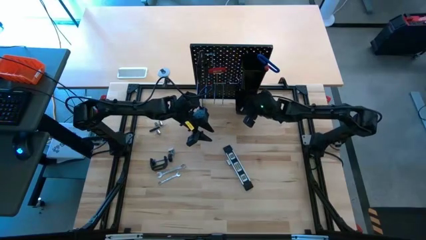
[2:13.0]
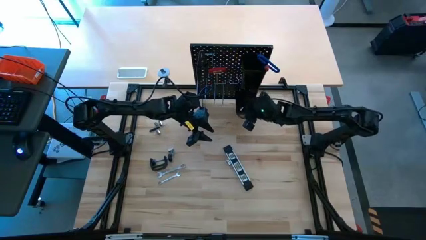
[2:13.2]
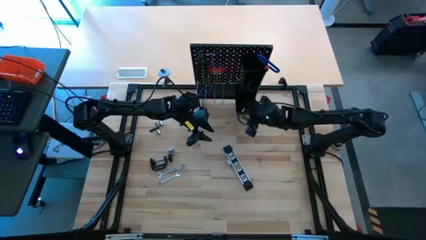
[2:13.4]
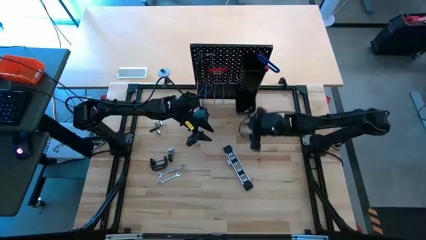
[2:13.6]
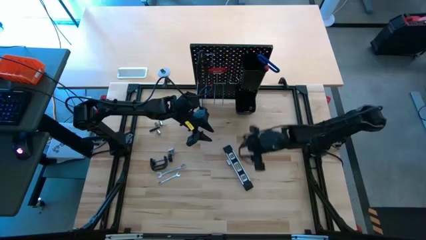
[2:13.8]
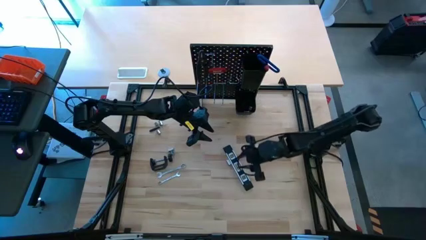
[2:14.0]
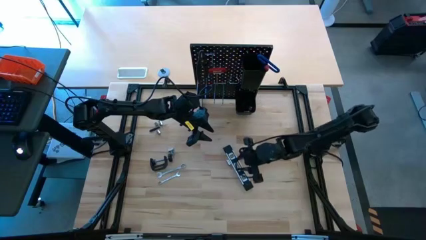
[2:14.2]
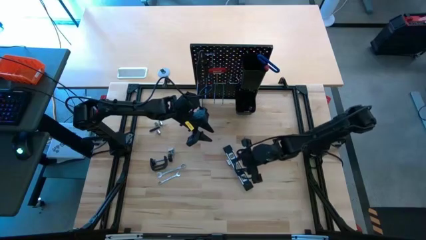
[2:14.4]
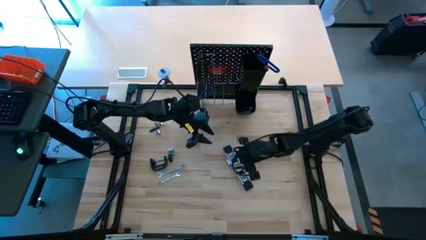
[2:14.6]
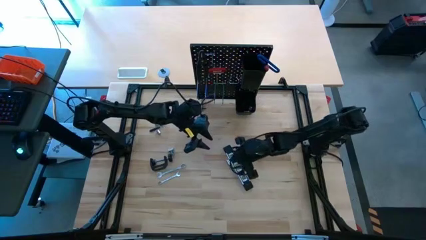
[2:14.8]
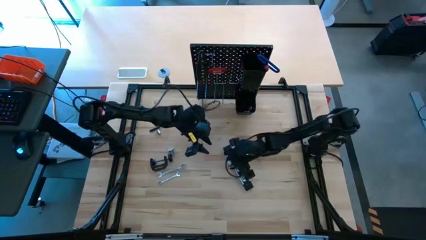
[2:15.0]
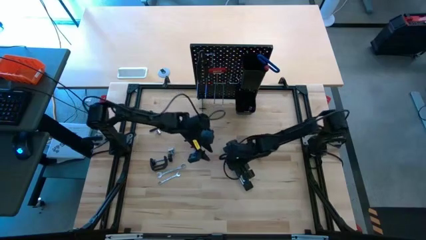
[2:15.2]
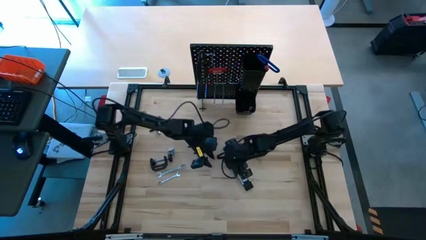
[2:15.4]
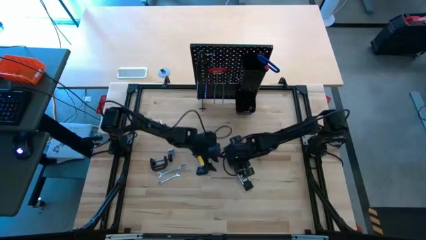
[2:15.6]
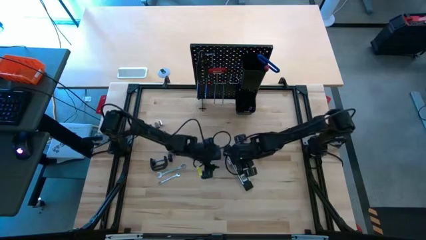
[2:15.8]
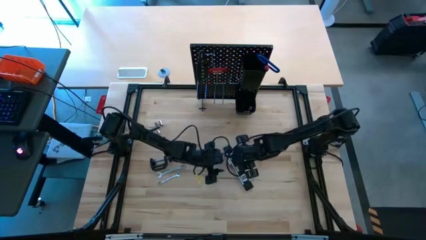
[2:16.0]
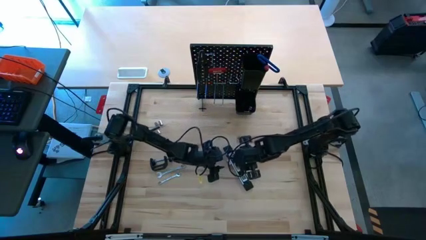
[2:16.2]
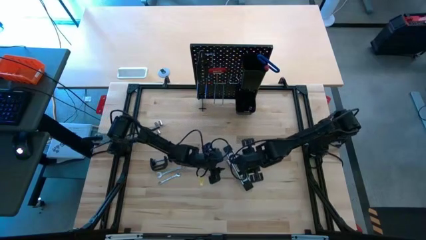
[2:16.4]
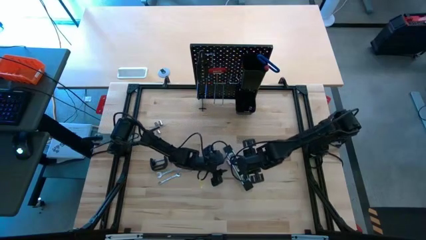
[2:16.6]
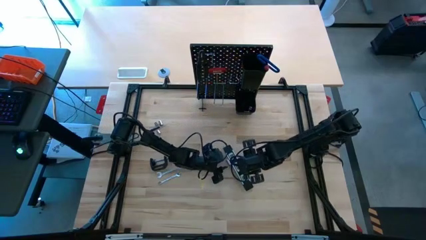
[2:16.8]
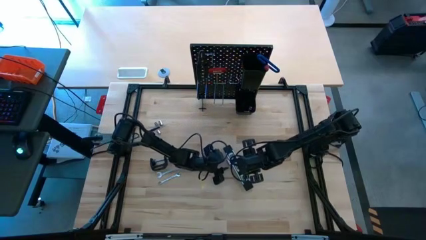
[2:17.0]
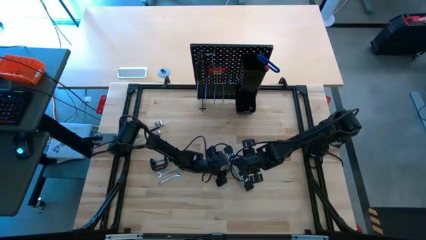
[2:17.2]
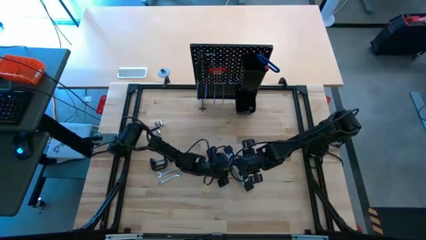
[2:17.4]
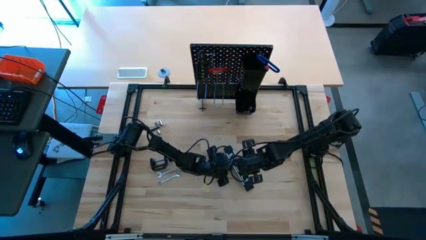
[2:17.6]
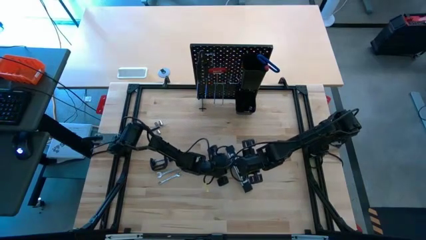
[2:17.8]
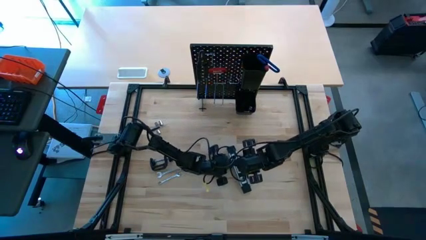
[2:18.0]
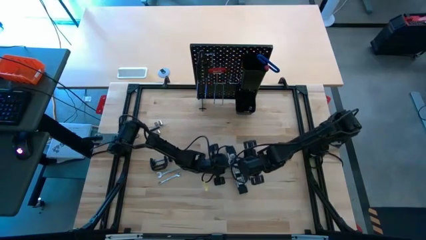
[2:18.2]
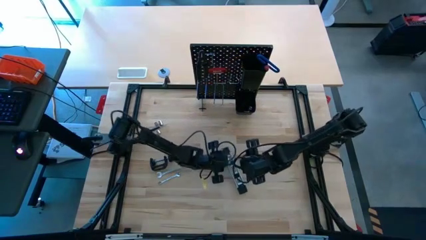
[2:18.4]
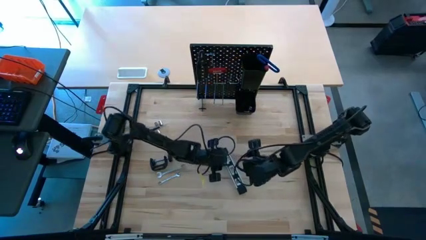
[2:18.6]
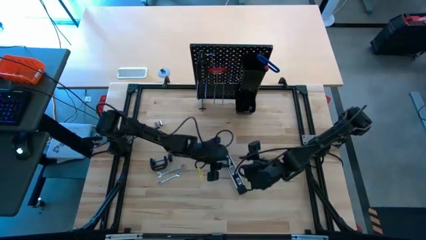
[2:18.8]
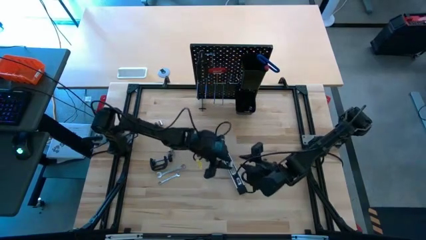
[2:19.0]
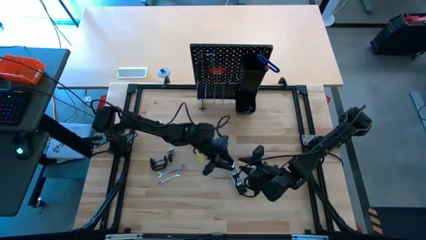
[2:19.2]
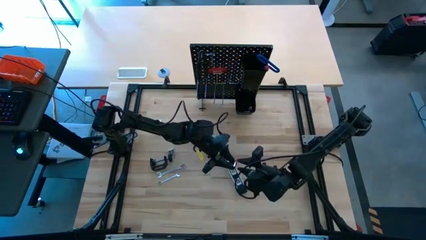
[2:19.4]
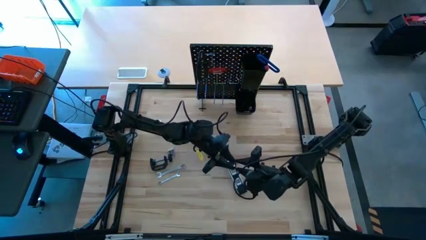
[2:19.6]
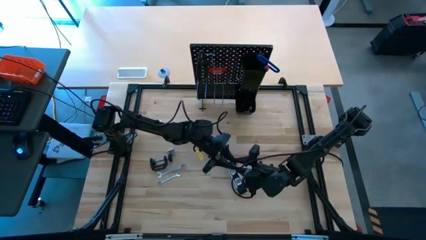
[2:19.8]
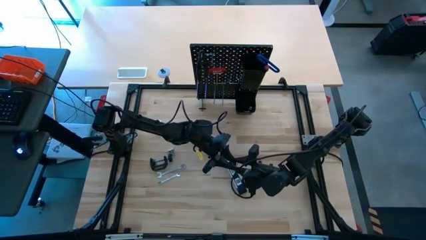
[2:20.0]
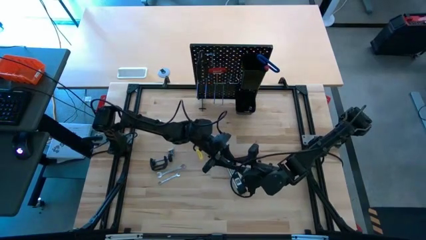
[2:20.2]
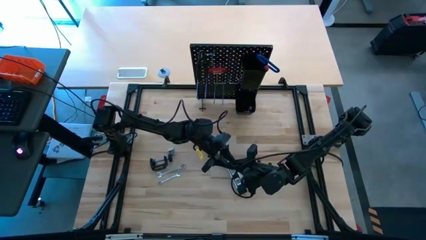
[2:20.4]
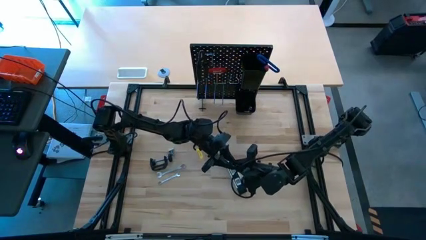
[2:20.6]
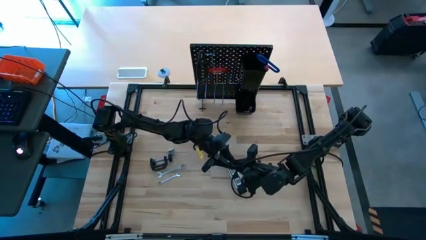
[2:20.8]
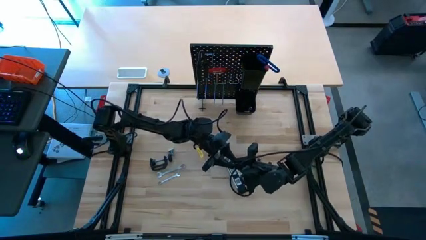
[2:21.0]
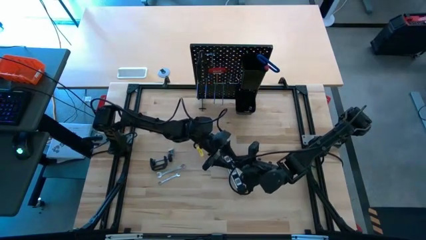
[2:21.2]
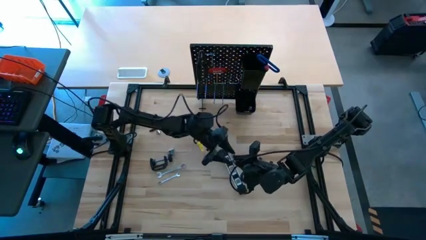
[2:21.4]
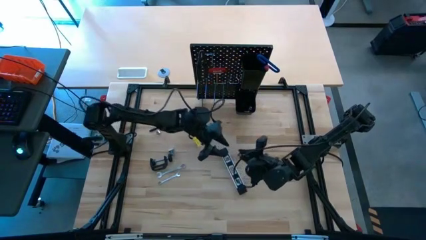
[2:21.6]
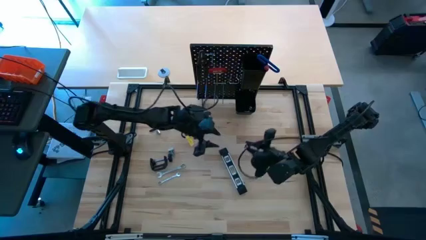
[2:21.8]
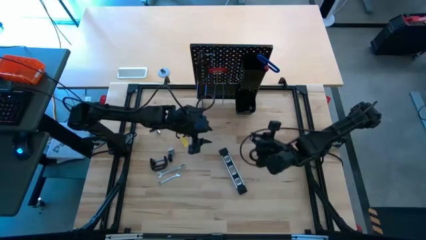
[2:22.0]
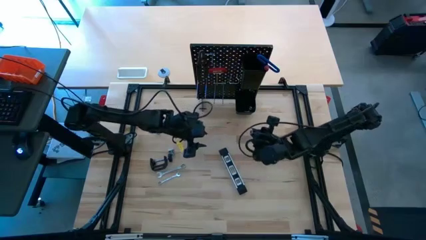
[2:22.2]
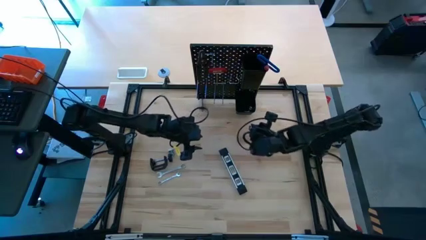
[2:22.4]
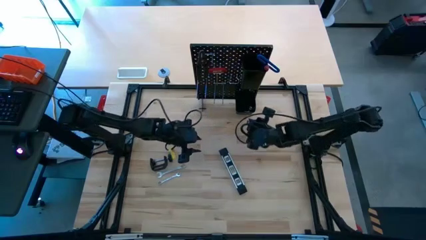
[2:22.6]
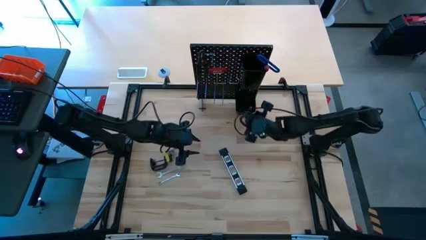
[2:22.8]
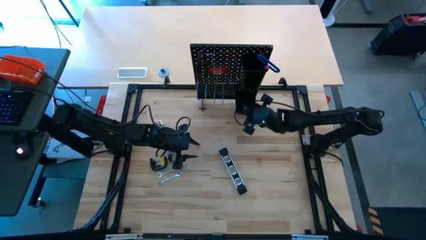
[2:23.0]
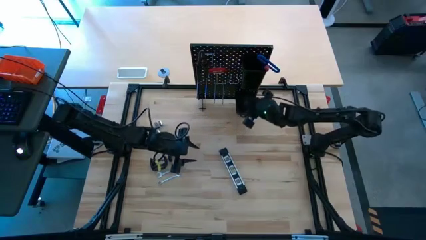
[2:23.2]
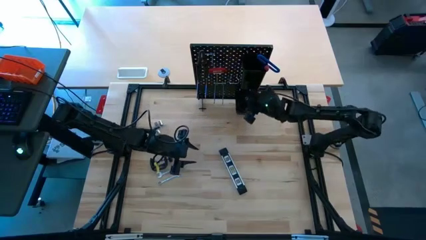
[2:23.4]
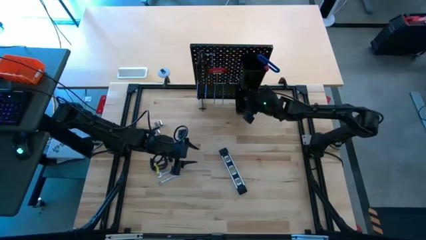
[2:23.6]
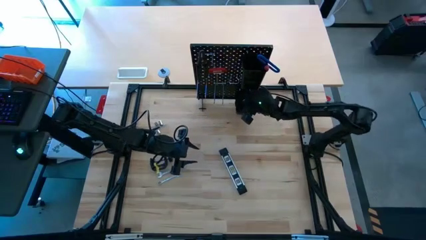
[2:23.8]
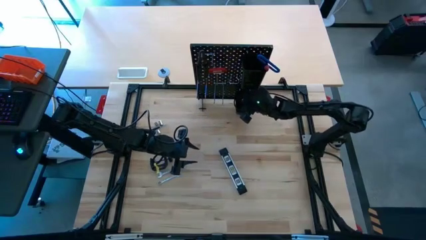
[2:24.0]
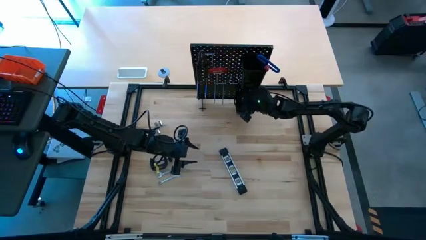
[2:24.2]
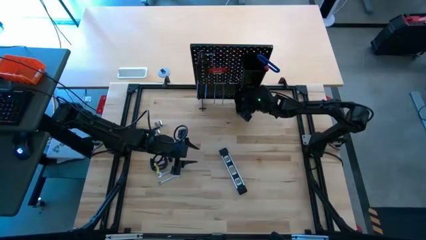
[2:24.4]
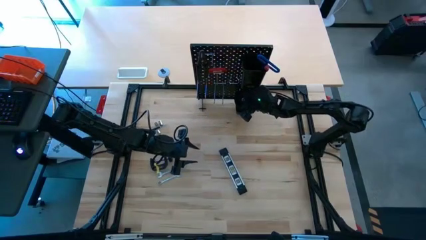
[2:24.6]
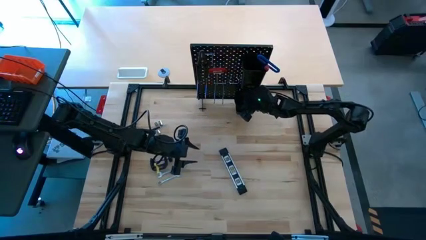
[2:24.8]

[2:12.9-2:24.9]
Task: Hang tools onto peg board
Put the socket into the bottom black bin on the peg board

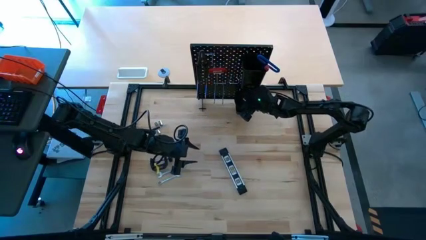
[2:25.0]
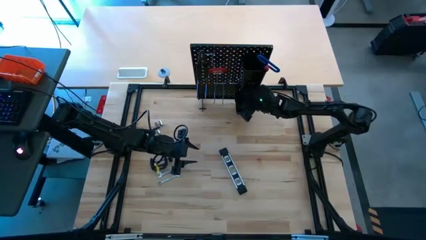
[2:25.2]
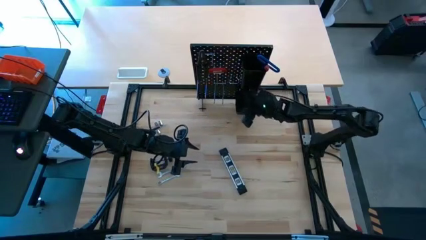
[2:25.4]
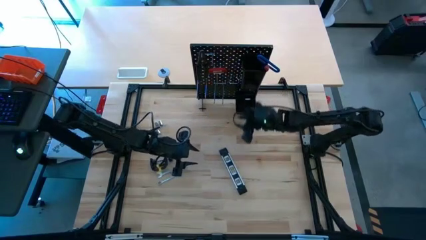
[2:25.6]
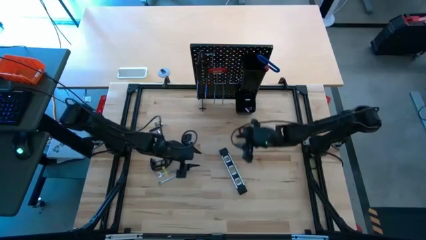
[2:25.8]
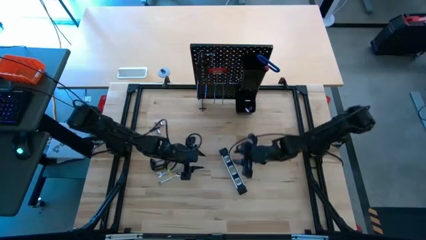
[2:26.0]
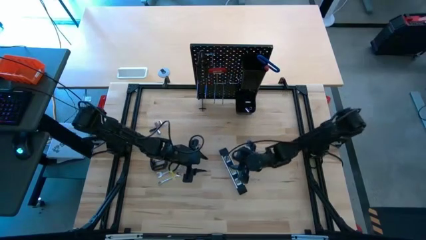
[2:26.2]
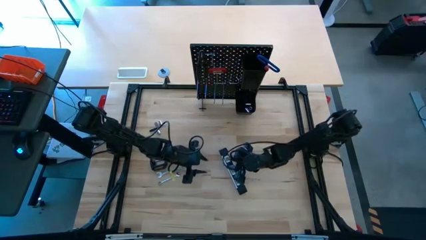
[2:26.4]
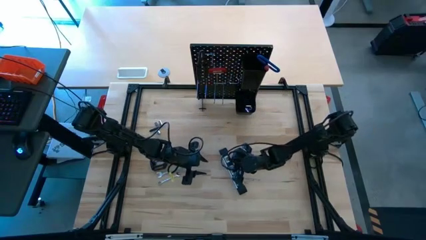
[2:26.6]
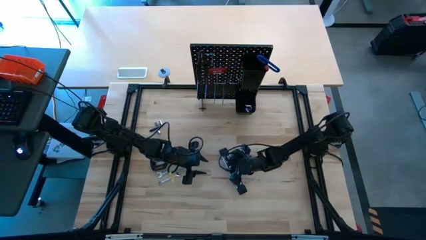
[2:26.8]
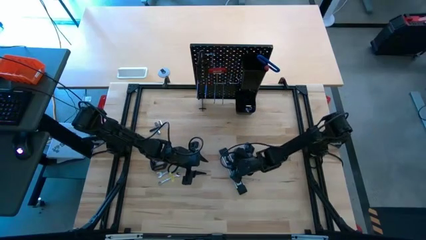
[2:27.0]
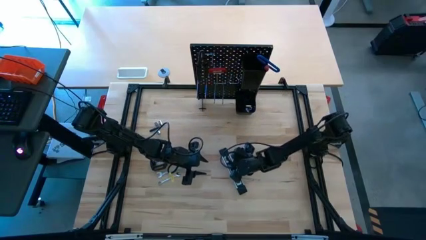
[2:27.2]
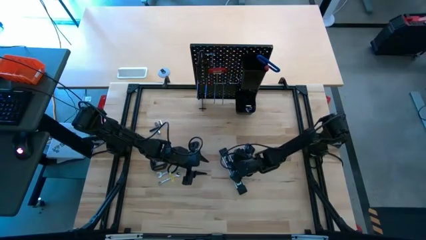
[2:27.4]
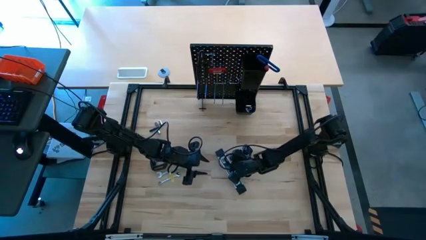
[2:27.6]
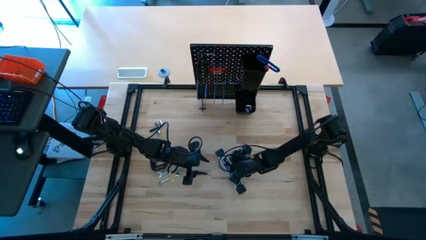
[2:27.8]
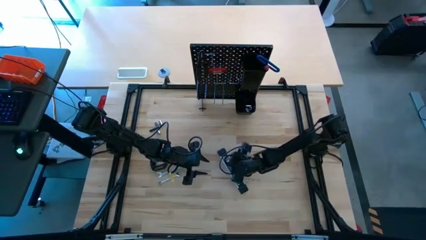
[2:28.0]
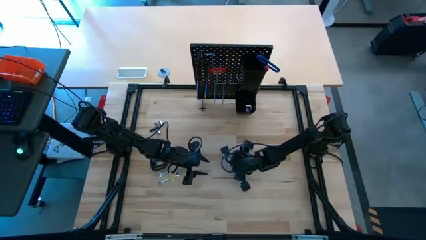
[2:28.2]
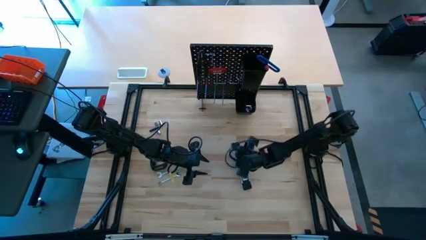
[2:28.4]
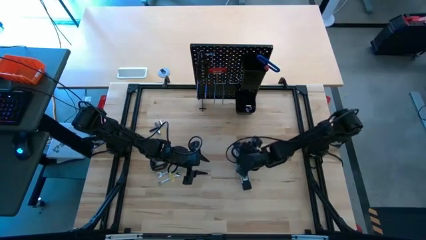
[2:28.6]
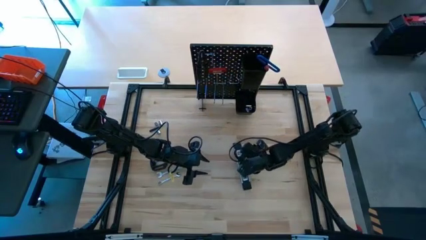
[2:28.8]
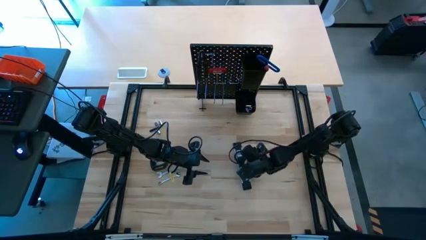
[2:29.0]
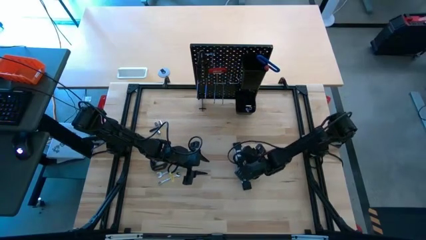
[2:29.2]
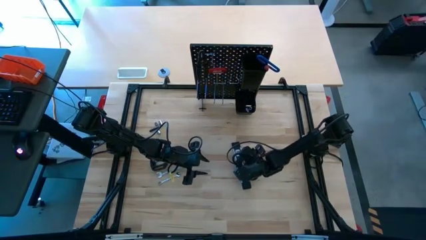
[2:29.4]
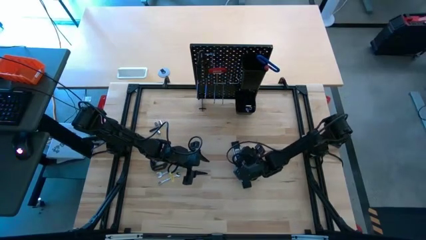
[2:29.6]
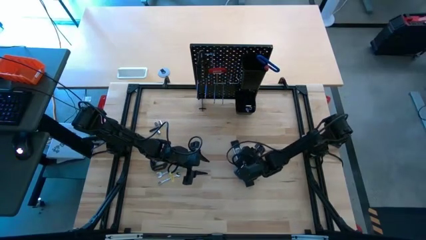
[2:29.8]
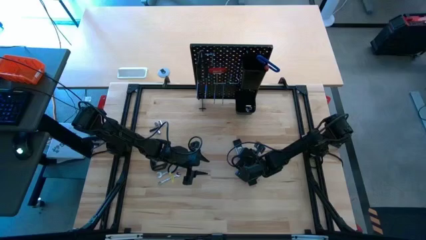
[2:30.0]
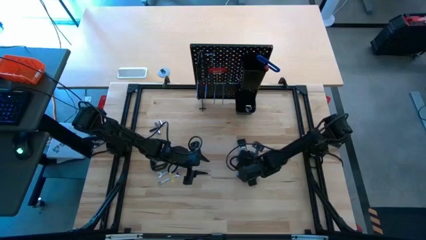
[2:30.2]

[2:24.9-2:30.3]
Put the spirit level into the top black bin on the peg board
